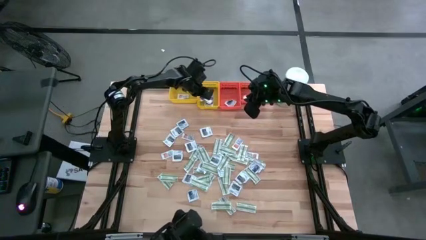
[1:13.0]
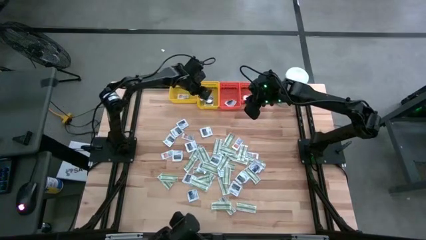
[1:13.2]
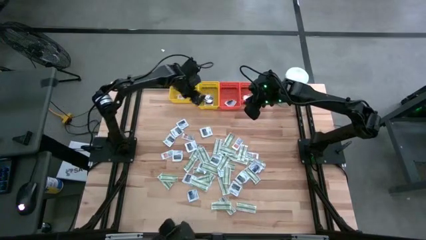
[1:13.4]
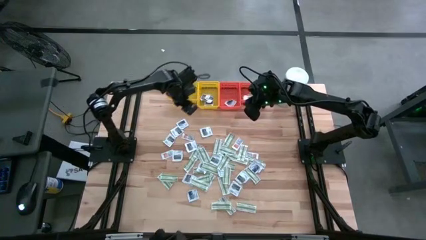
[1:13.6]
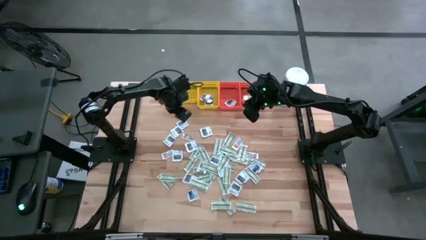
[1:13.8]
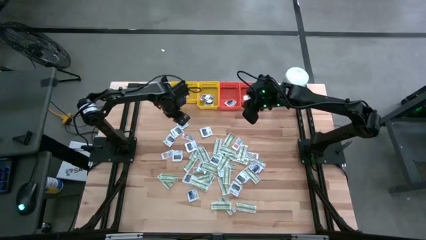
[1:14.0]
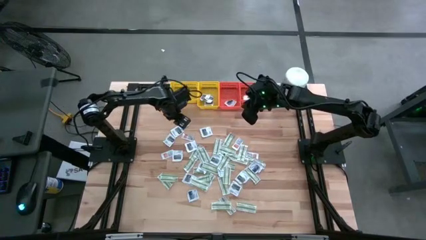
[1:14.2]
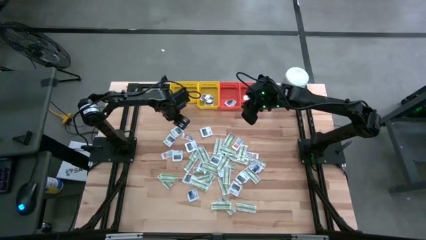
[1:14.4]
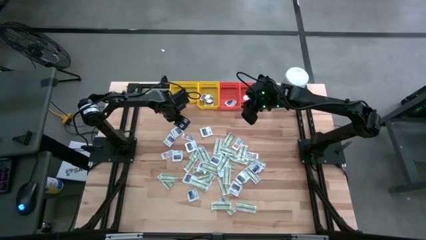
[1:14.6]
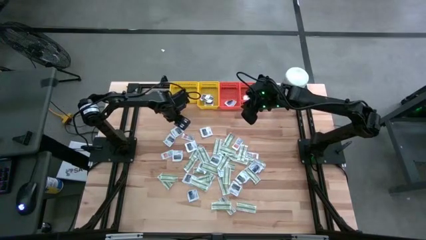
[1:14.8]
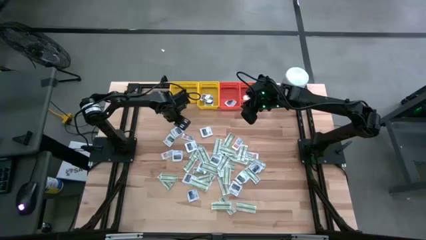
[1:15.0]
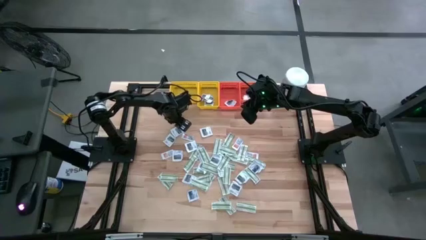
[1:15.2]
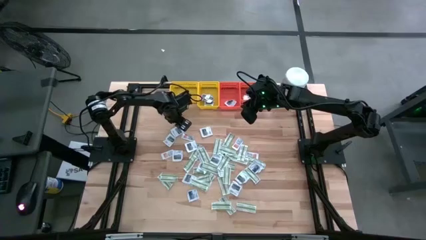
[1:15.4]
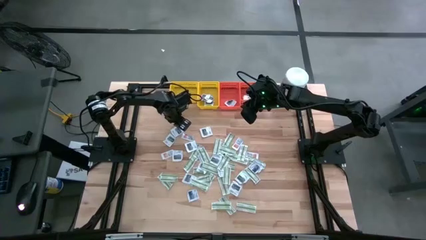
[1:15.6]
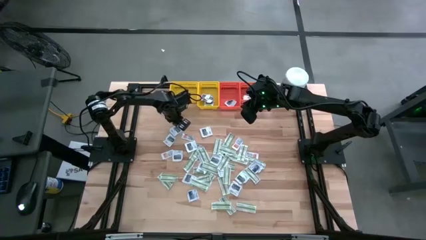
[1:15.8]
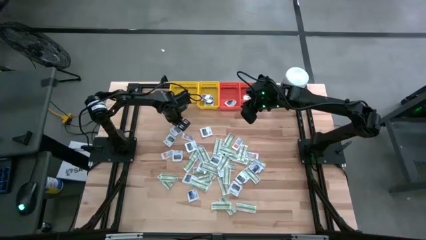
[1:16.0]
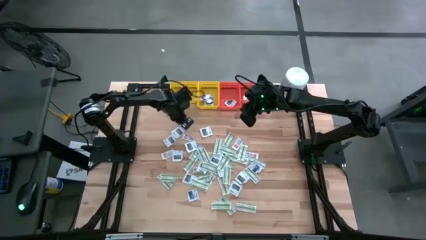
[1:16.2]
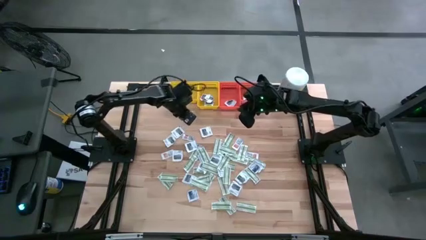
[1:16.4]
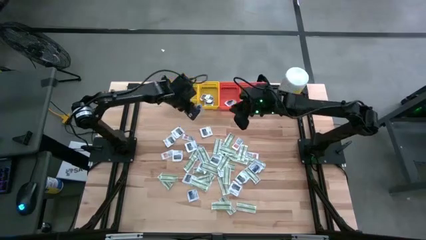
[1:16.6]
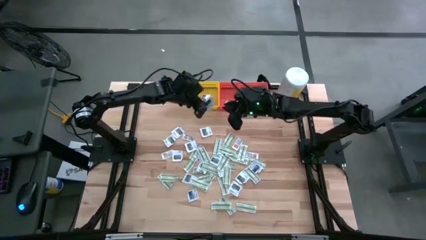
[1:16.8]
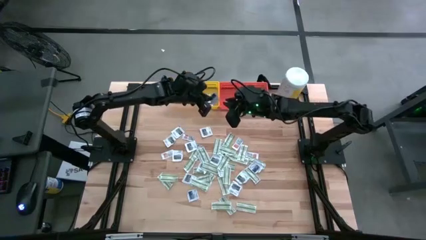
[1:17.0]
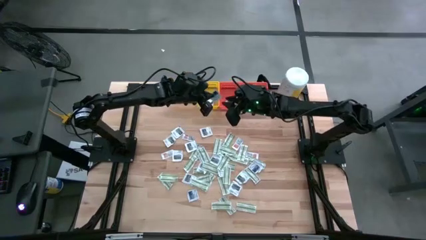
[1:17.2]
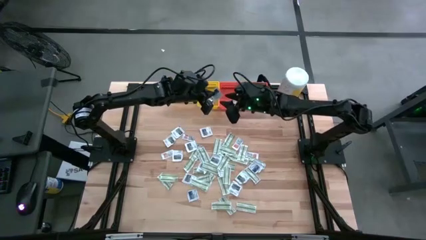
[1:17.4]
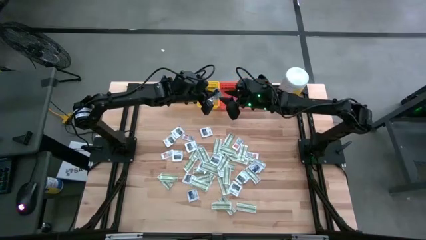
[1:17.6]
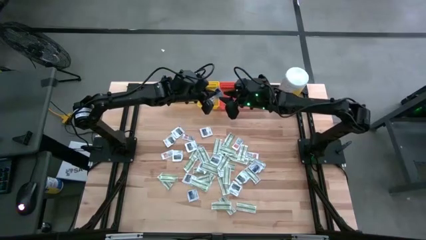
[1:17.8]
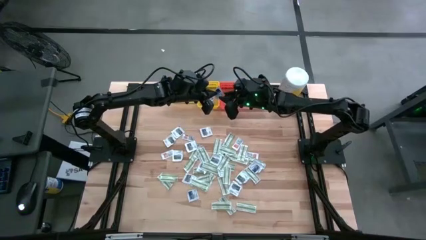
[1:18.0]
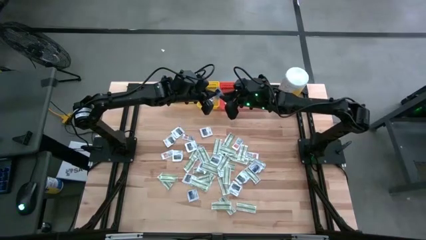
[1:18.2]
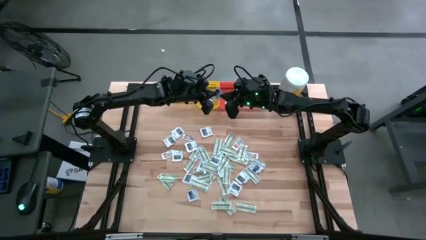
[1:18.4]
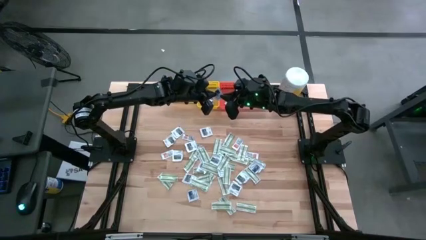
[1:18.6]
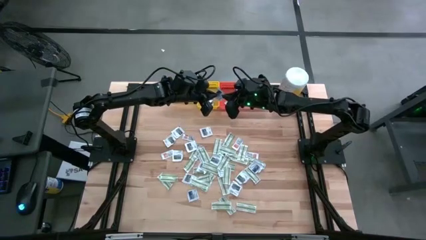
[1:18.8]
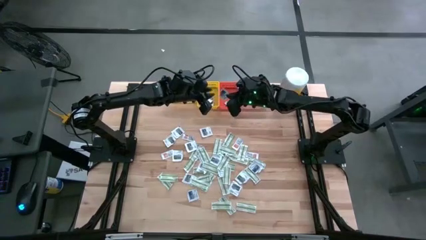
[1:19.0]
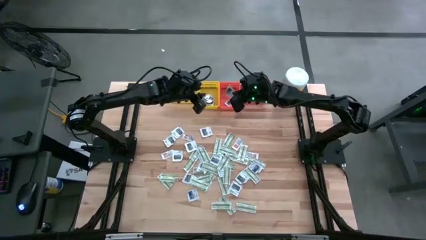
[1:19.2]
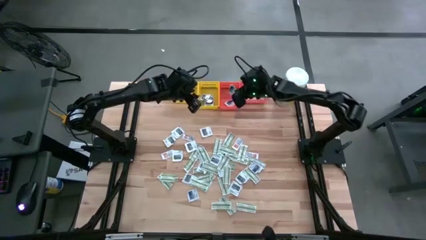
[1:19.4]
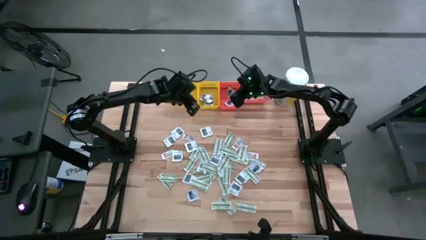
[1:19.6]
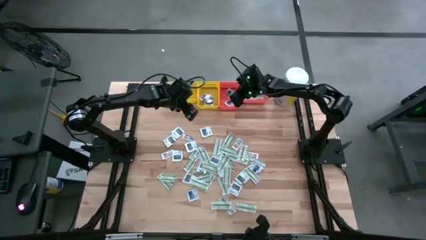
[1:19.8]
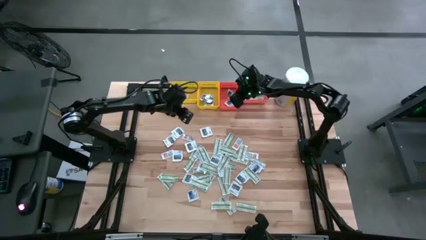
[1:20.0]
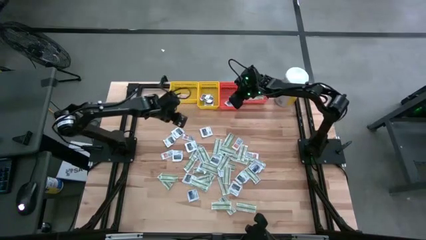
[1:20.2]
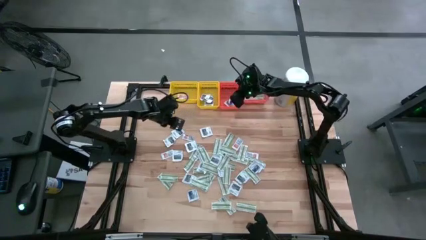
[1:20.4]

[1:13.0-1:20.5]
Task: Pick & Place First Aid Supplies
Put the blue pad into the left orange bin

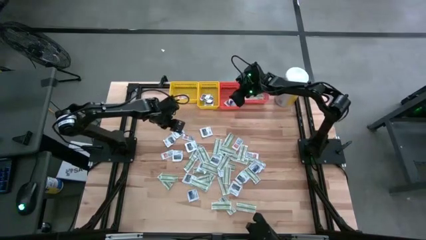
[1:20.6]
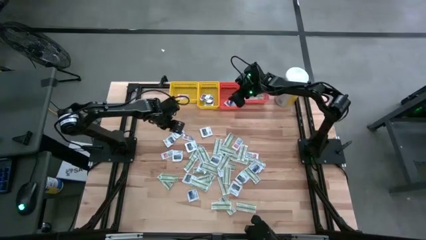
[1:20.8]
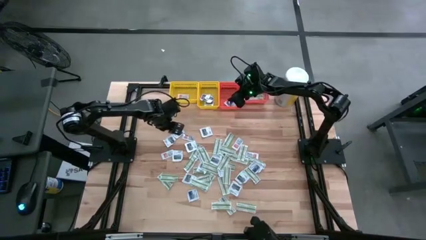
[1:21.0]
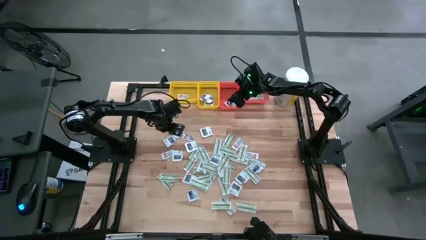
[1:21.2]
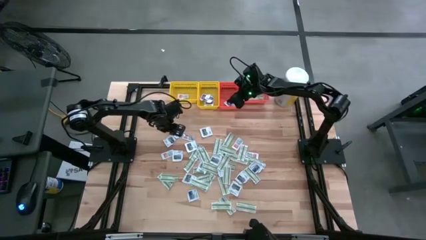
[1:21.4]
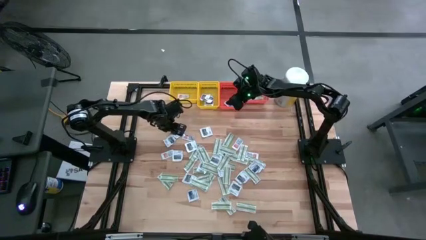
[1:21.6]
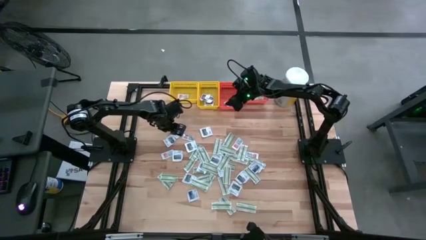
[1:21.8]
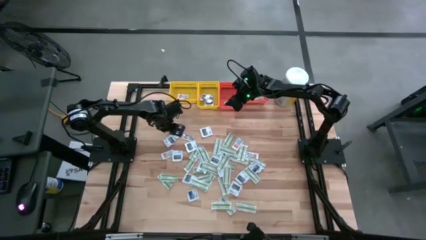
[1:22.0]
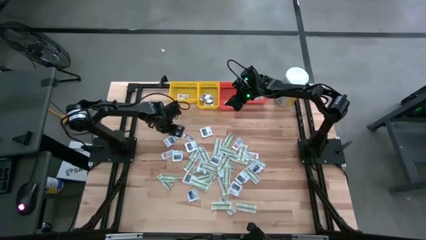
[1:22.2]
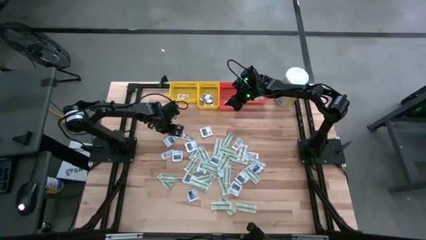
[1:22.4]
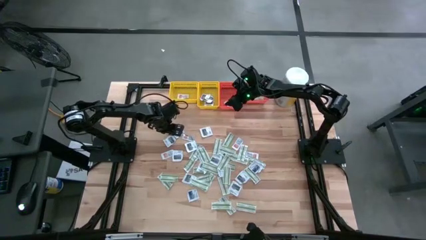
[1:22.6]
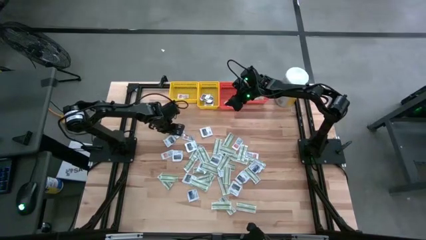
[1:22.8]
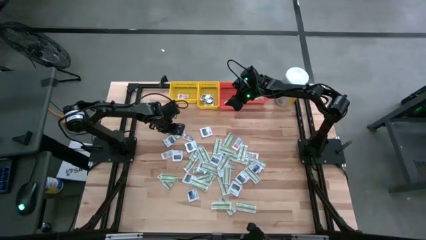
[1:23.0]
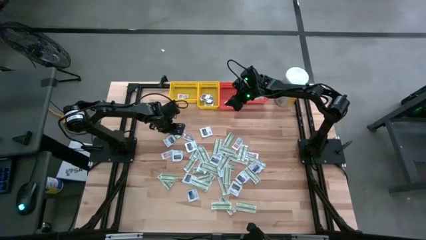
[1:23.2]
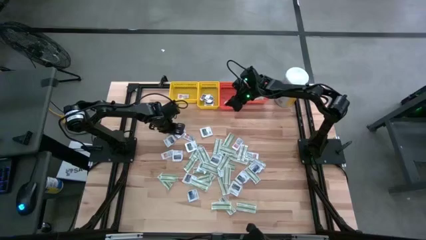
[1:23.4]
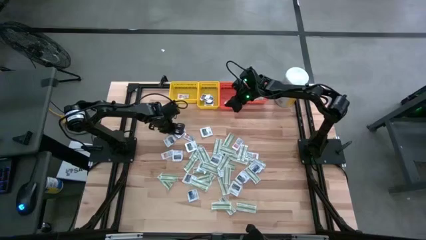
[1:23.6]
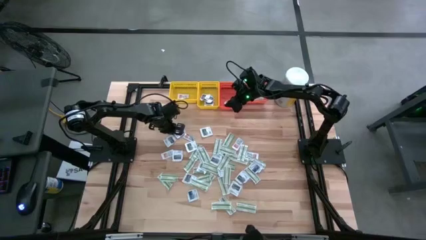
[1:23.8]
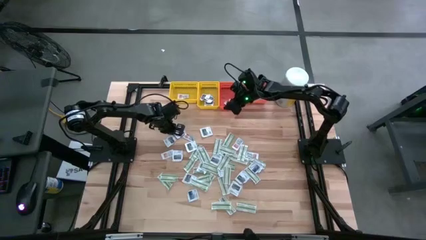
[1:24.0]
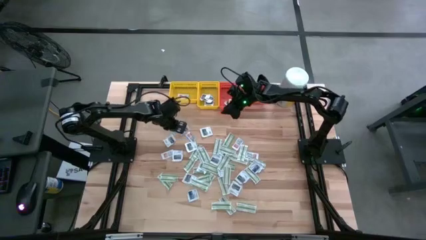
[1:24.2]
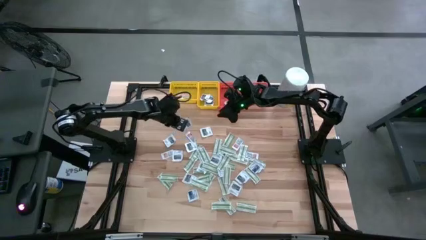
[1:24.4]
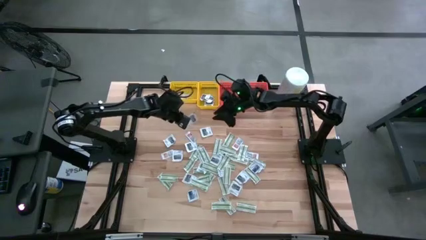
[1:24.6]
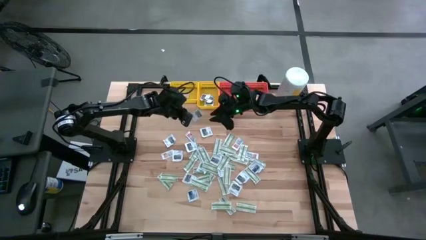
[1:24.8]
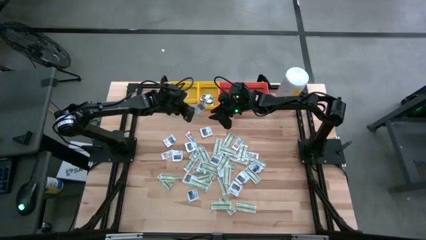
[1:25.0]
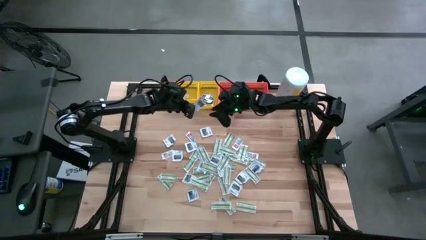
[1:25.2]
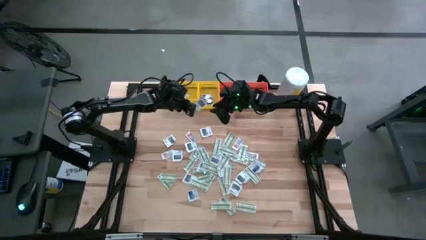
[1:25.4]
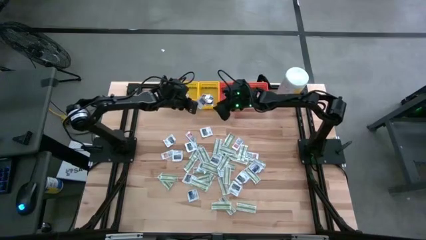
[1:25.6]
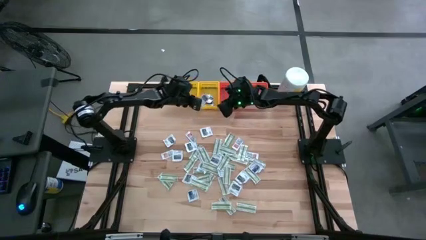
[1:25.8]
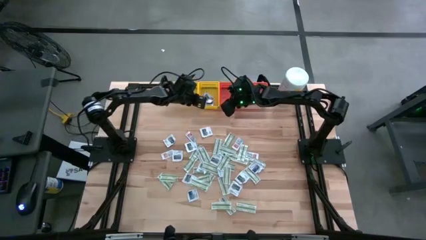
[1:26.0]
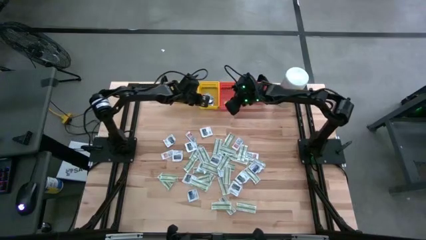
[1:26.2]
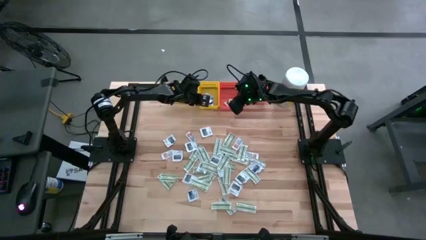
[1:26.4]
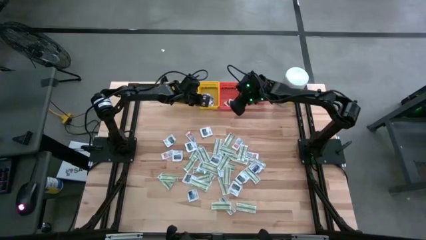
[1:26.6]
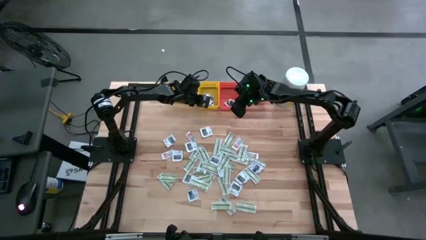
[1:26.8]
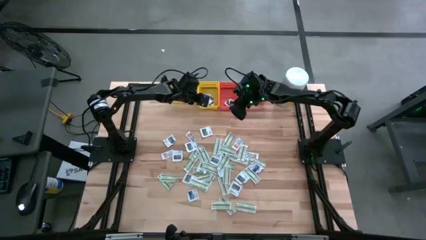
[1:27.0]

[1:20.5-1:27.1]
Put the gray packet into the right yellow bin

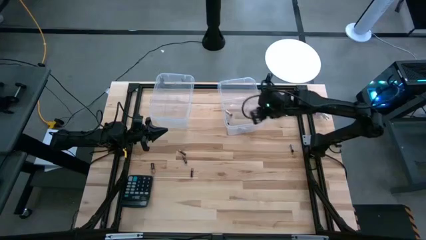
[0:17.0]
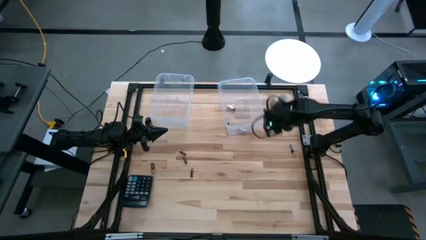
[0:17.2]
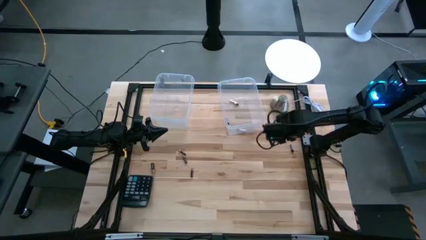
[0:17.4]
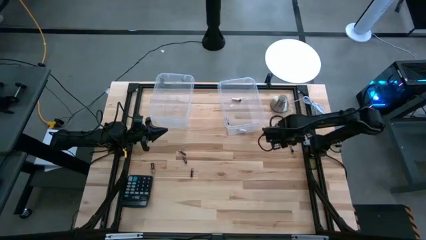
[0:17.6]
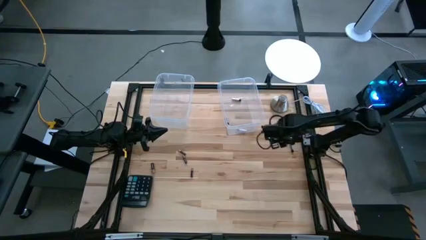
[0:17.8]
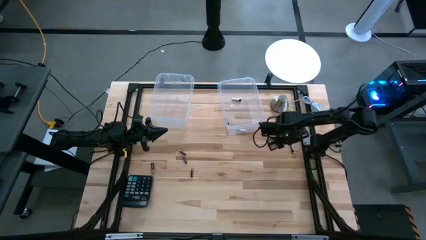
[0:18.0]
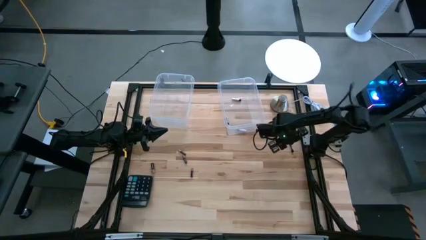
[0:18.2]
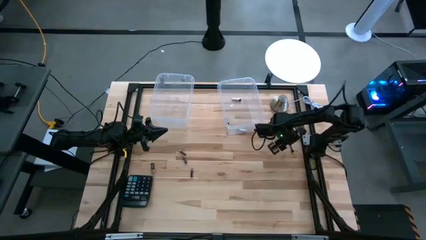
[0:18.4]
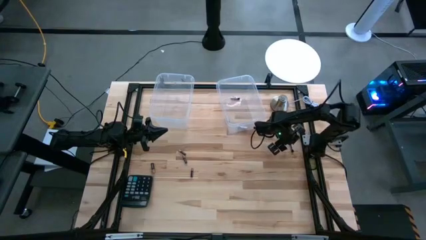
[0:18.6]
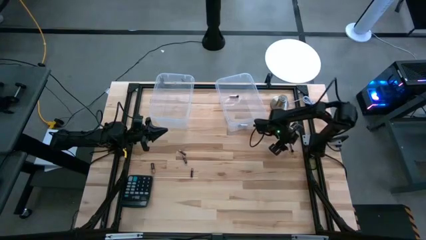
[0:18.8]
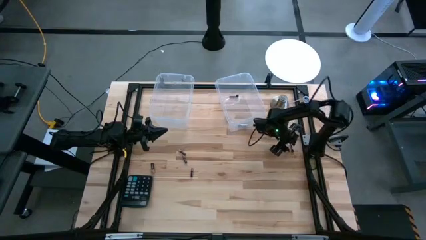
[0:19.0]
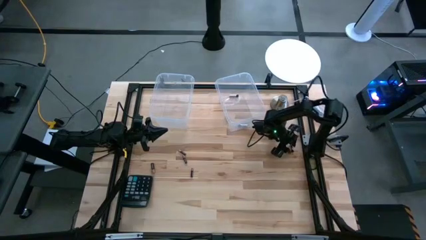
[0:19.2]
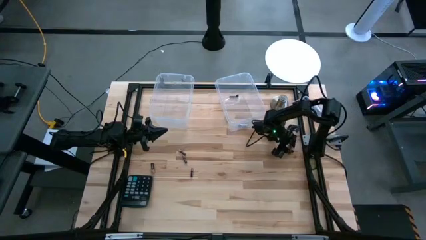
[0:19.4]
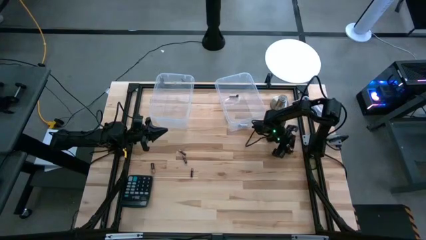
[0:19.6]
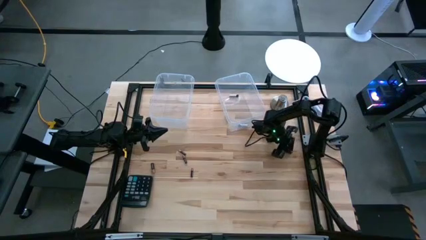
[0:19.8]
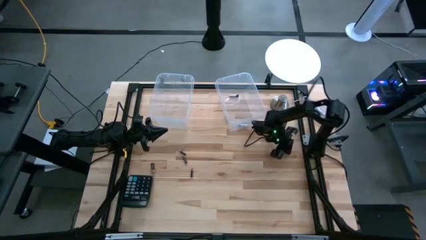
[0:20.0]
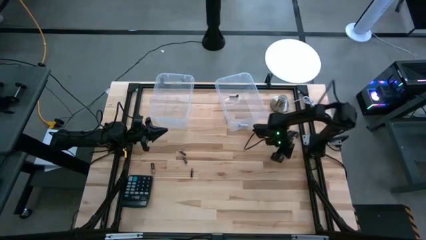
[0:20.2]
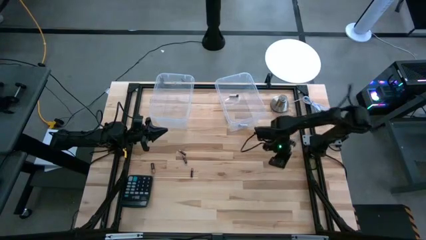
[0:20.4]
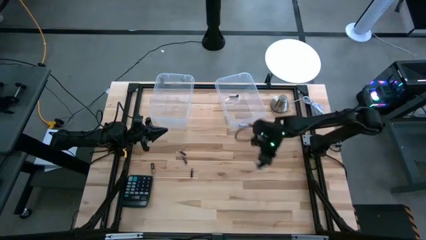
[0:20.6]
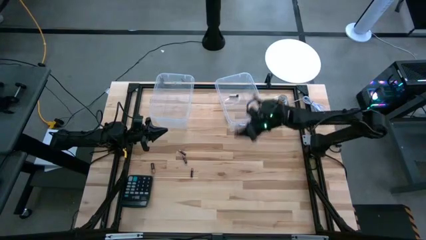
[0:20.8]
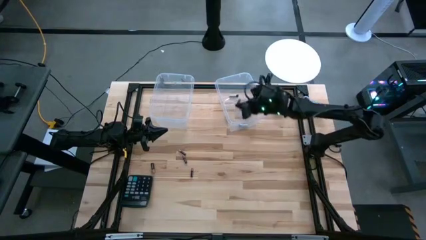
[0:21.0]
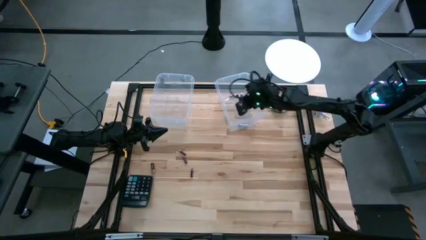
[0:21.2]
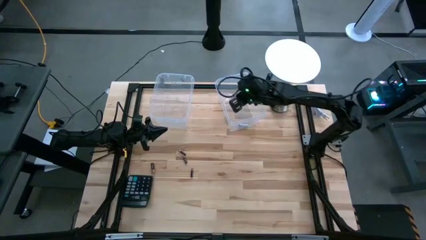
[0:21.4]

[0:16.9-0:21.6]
Task: Sort batteries
Put the silver battery into the right transparent bin
